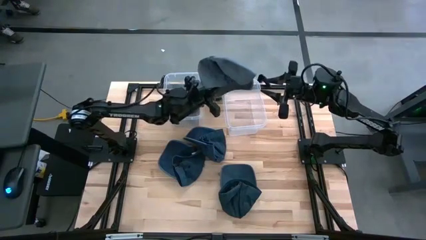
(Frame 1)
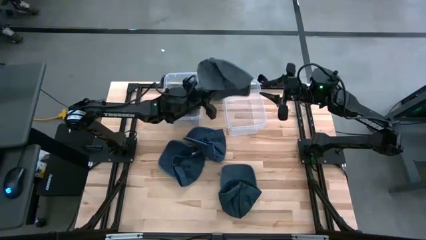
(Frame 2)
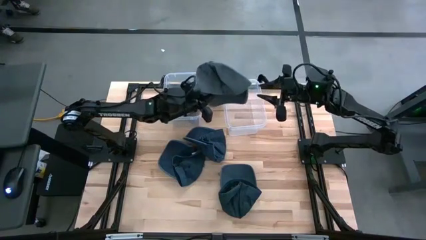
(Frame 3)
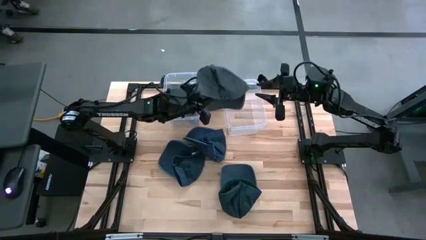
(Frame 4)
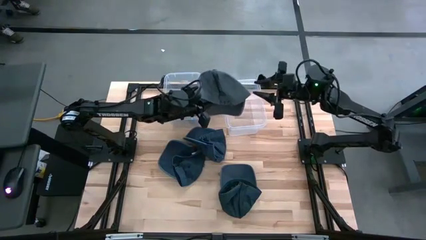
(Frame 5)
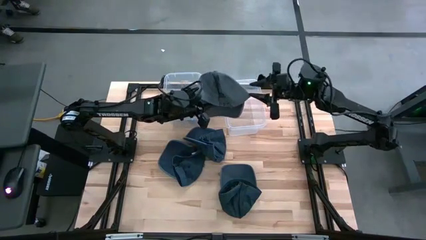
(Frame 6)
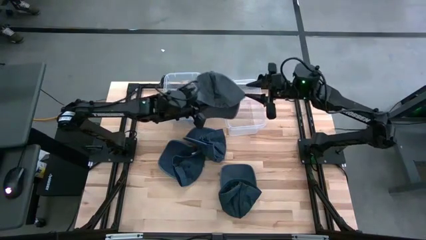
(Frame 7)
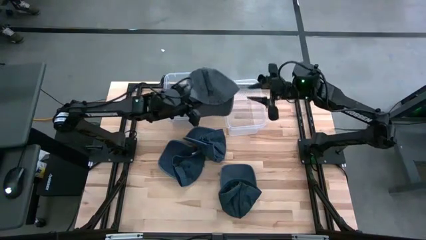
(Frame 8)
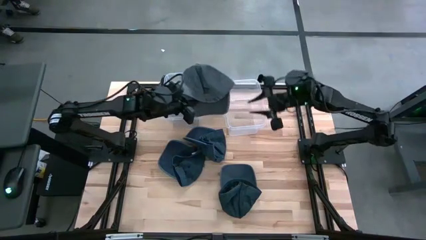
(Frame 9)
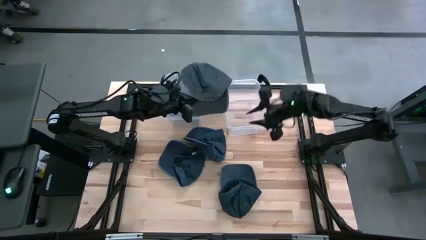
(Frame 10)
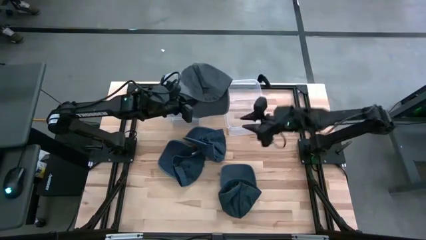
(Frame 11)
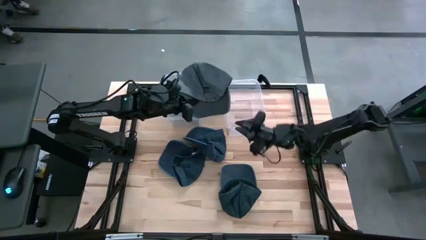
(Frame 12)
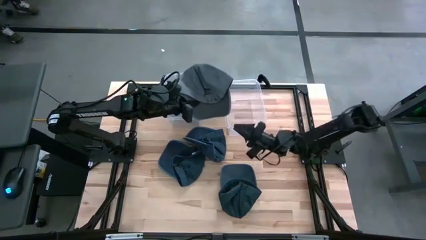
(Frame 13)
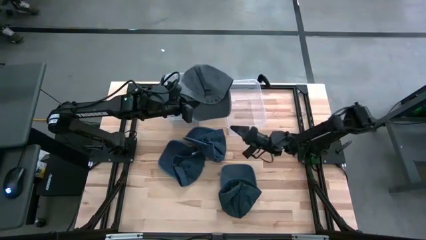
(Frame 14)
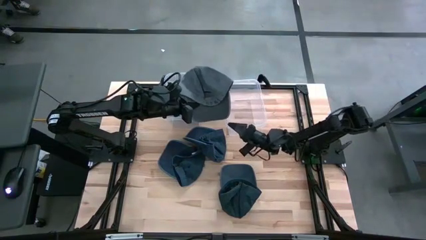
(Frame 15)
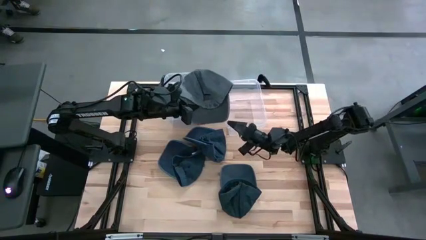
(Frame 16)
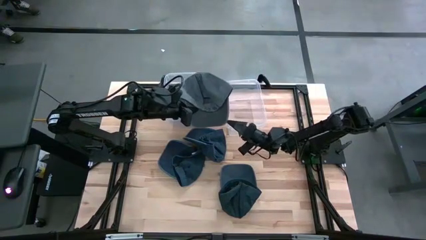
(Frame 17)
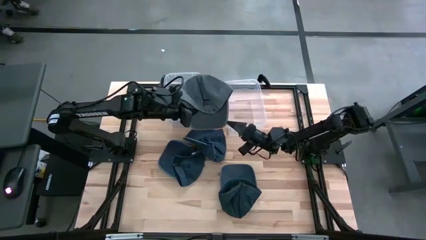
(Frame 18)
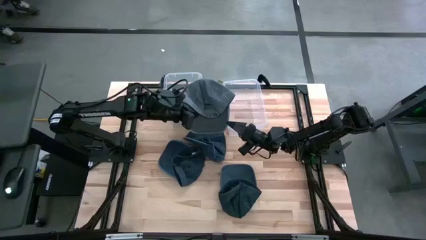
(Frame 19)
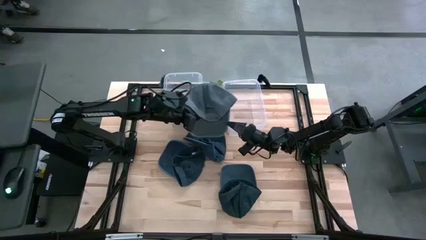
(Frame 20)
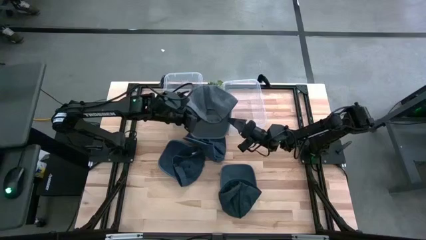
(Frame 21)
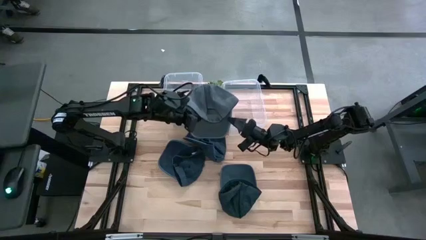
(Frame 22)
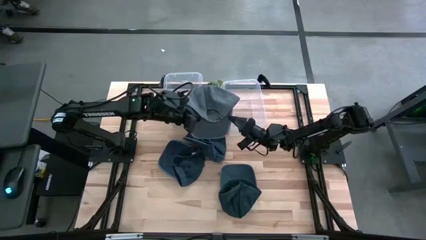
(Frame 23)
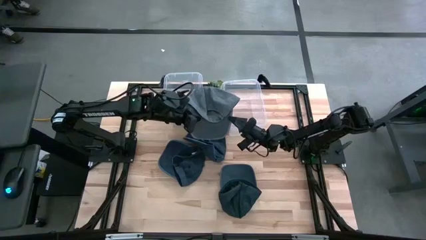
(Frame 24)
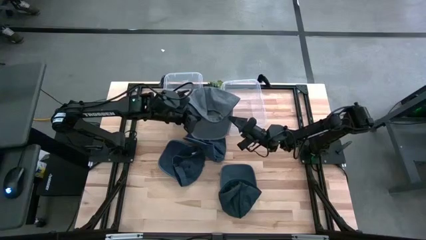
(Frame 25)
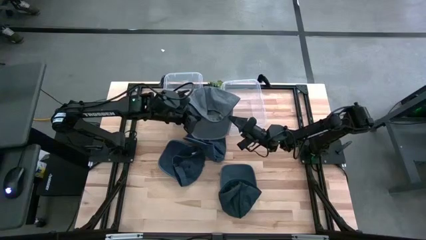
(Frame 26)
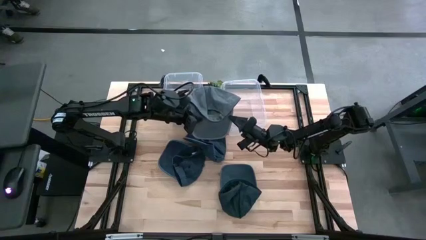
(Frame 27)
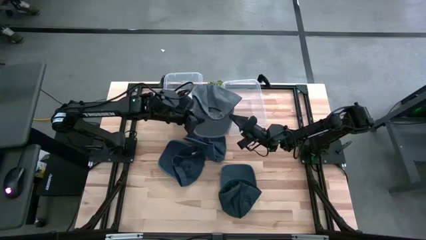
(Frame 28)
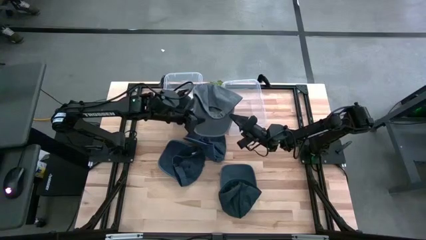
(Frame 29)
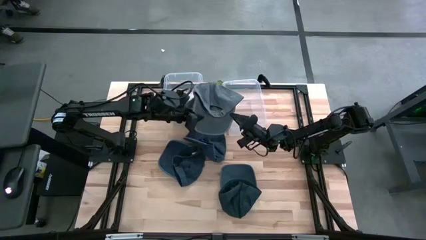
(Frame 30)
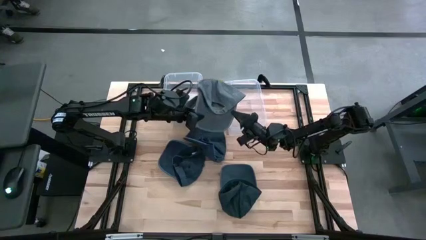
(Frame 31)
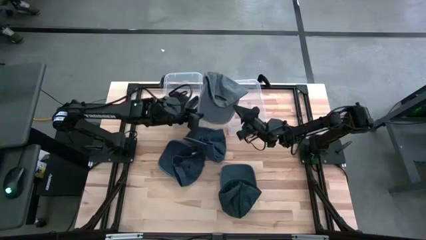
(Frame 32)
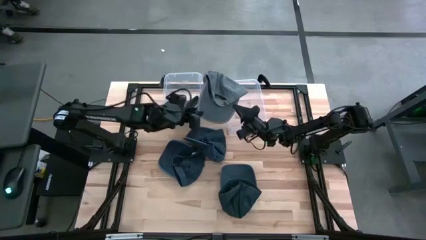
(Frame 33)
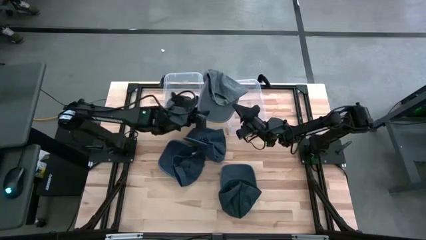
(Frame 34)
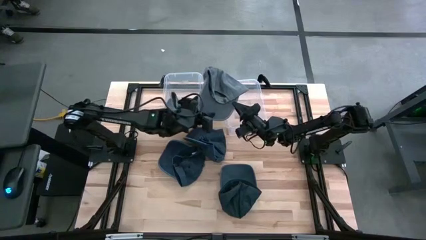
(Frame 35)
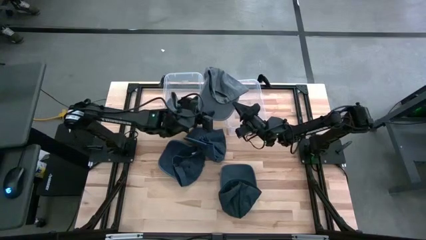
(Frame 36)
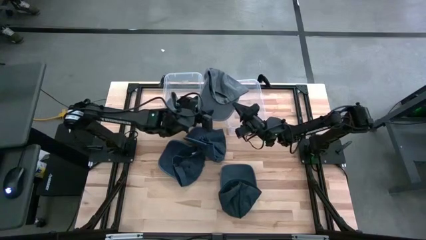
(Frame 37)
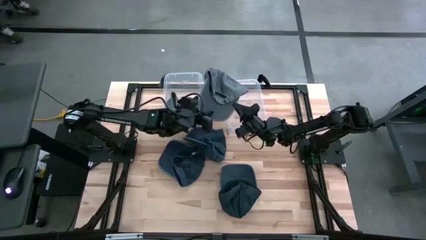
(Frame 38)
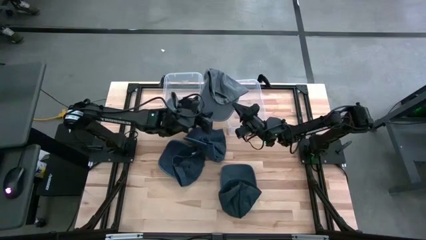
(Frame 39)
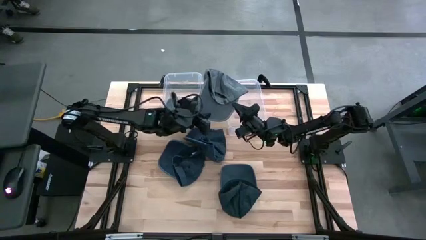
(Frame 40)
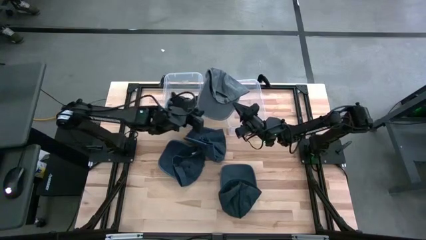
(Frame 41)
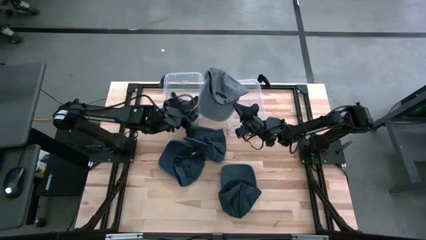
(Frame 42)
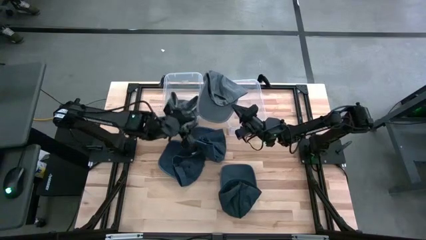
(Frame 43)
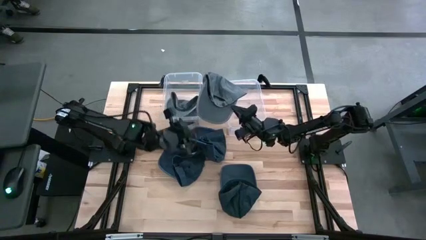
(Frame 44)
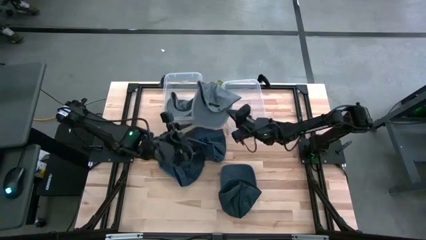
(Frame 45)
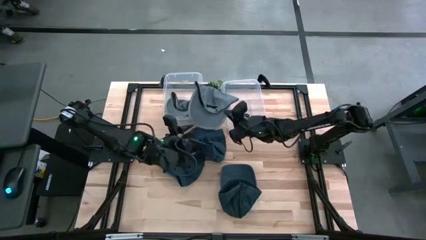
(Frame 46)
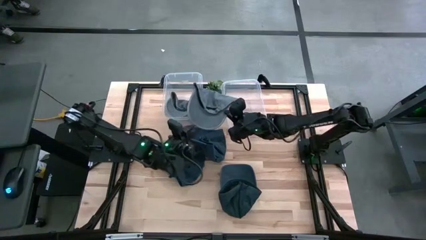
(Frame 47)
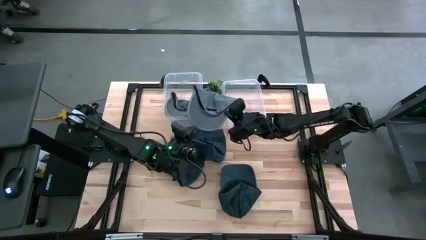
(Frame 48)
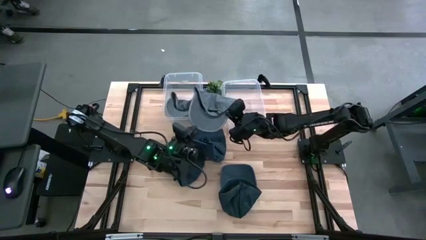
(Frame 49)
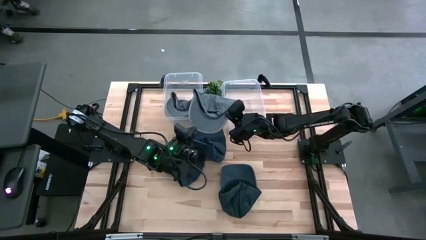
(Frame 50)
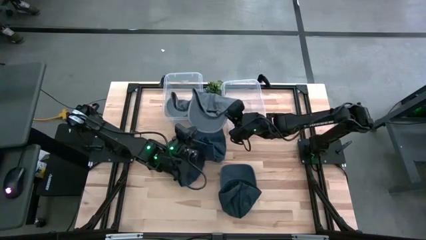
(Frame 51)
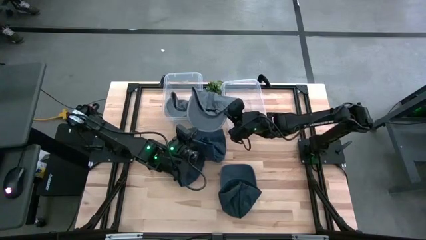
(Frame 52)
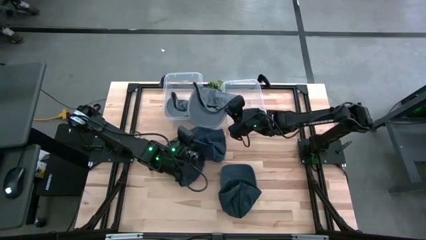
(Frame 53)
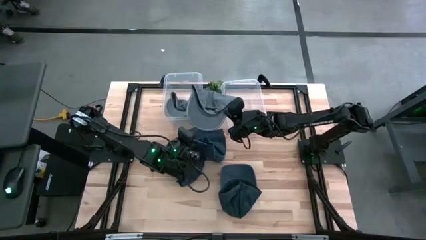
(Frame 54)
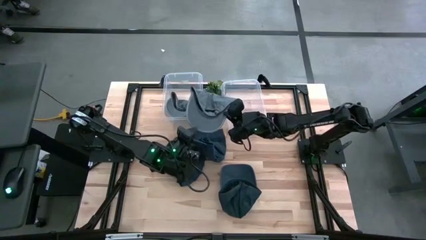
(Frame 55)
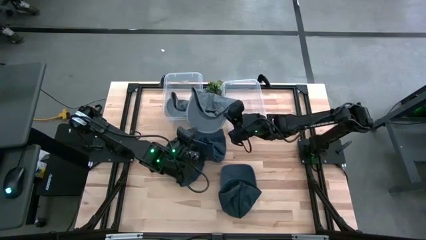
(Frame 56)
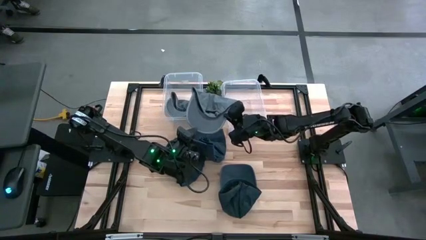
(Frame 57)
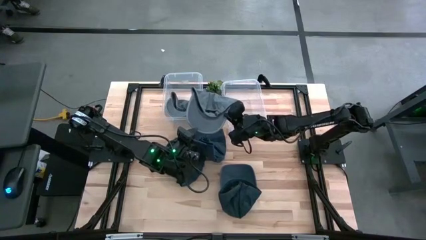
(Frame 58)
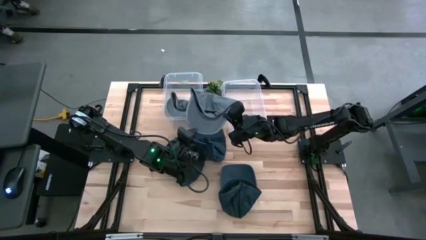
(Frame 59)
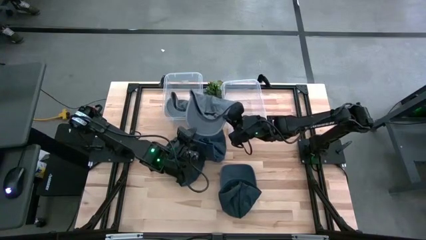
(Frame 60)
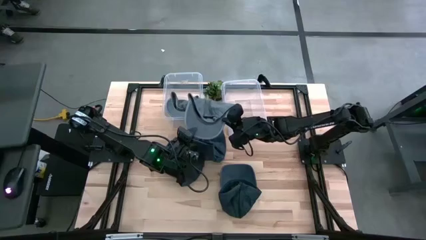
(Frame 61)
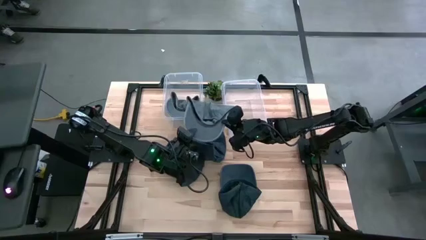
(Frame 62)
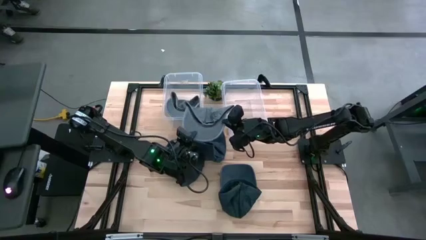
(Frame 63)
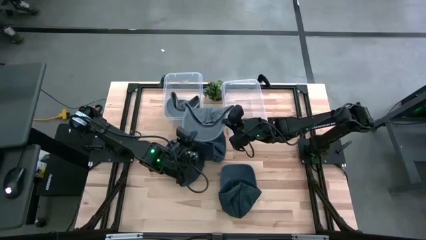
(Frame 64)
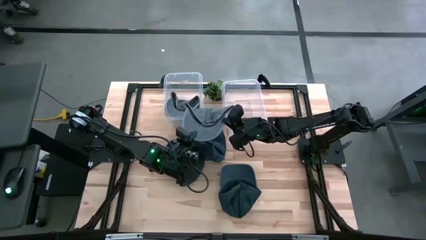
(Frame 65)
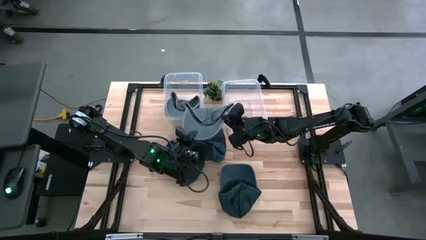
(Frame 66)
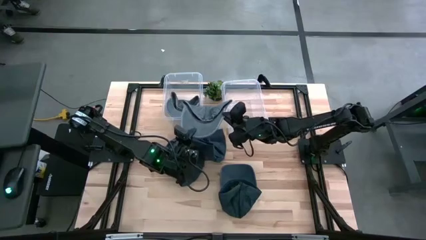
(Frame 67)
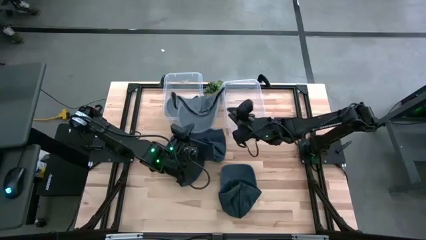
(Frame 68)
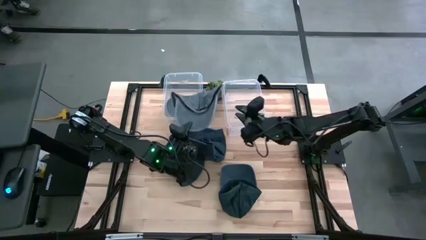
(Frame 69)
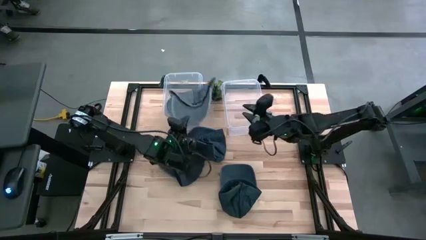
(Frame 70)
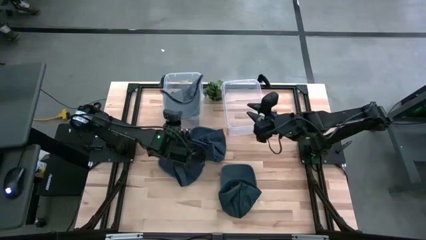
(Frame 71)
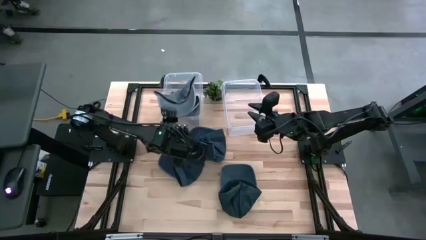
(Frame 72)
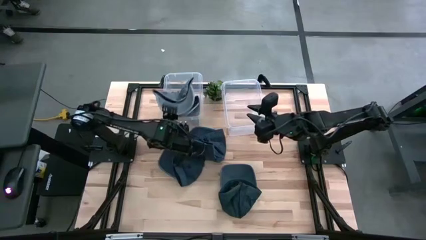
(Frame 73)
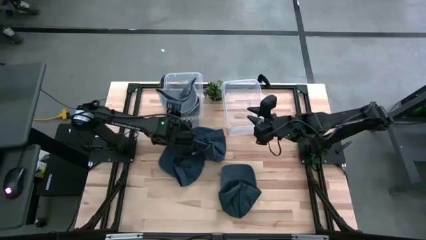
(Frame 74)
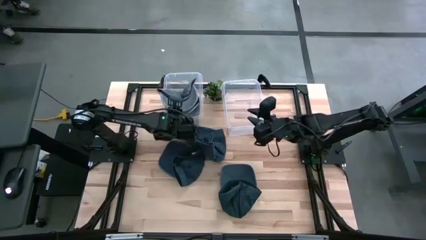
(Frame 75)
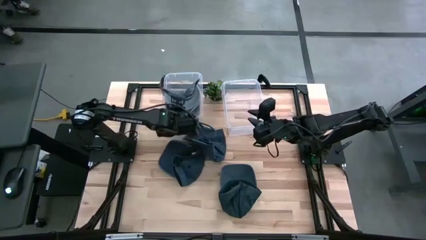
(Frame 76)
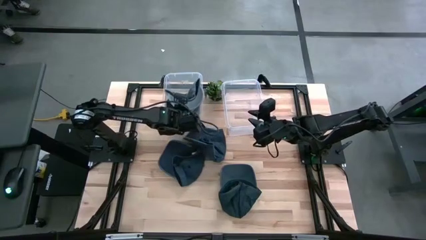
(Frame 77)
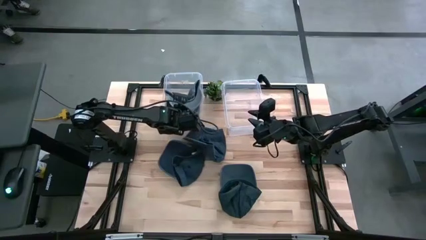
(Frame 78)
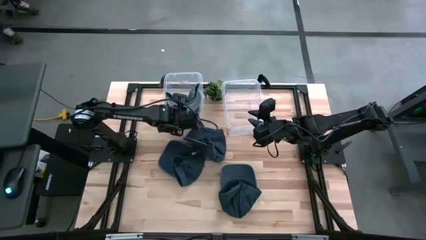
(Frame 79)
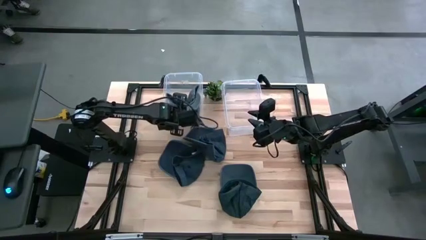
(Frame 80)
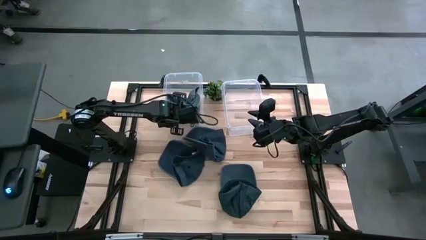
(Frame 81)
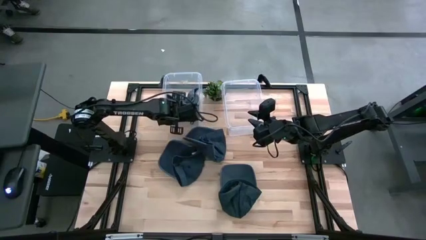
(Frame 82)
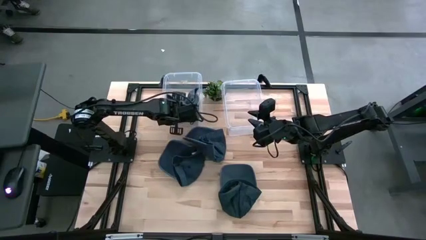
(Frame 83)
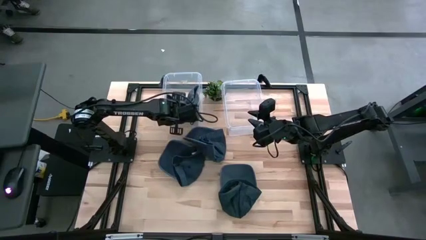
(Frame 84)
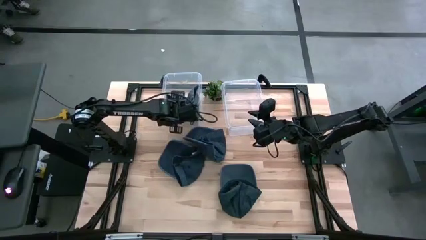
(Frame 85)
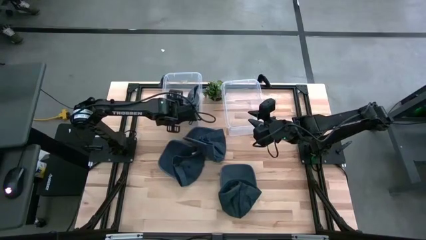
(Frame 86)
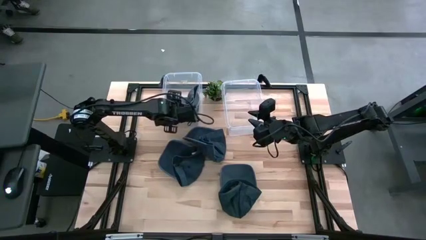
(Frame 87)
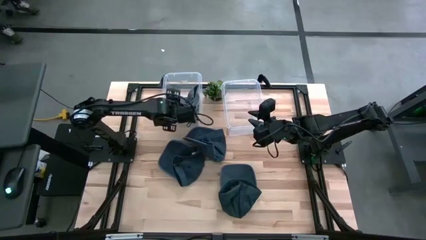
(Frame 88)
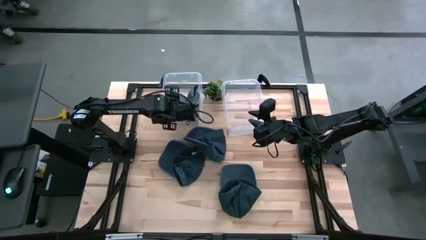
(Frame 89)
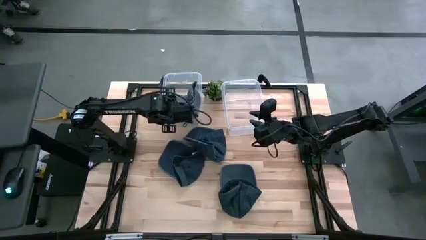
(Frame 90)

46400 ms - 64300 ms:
Task: Pick & Place hat
Put the gray cap into the left transparent bin
